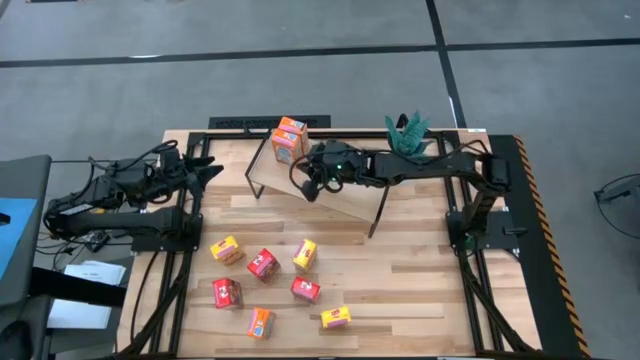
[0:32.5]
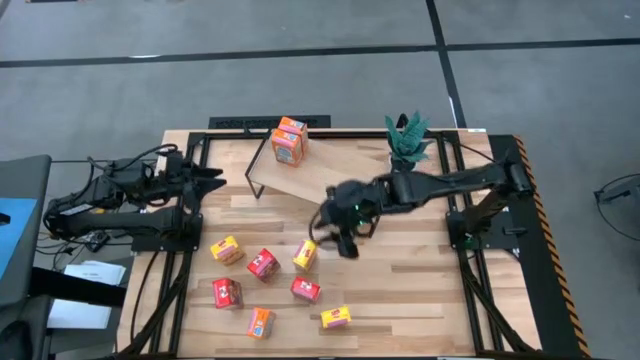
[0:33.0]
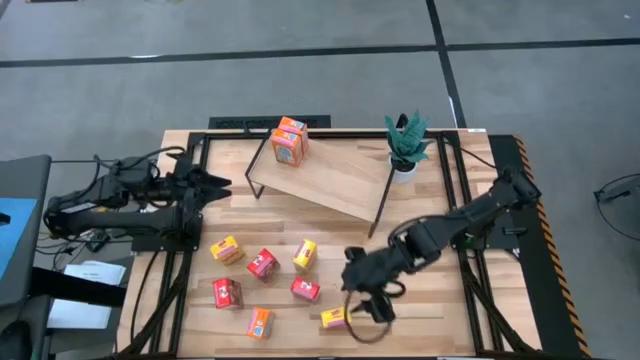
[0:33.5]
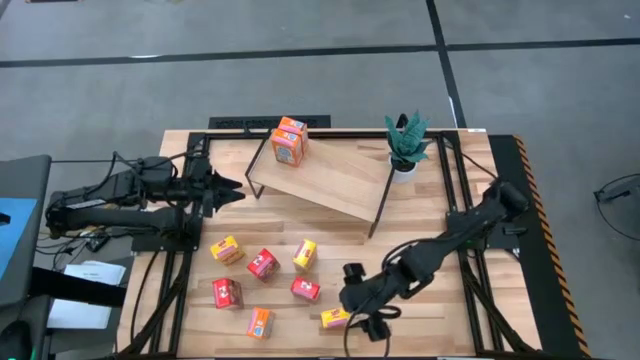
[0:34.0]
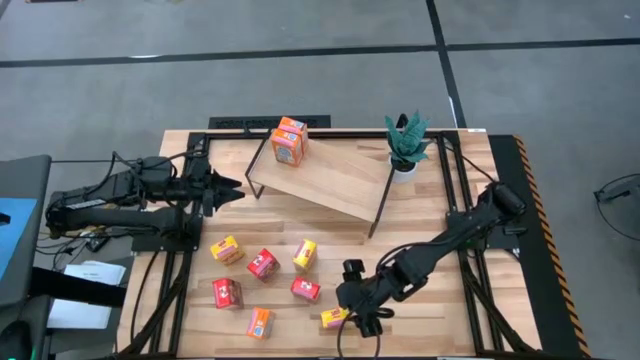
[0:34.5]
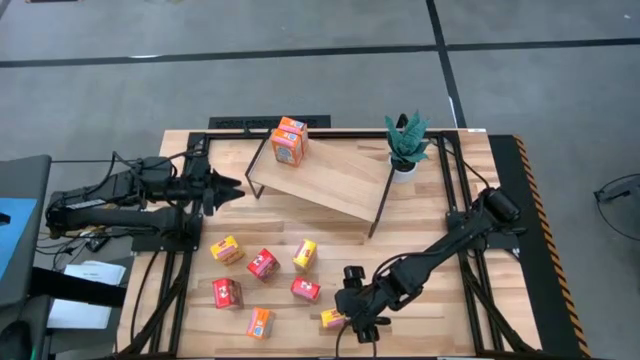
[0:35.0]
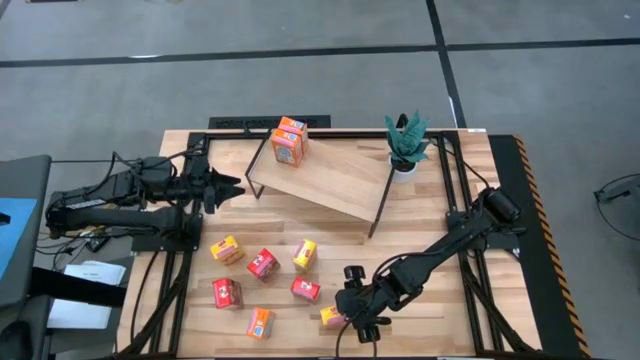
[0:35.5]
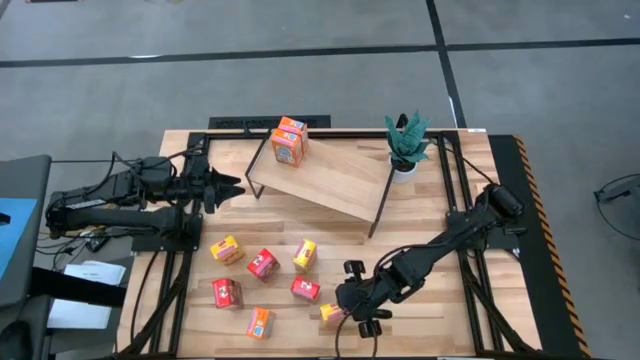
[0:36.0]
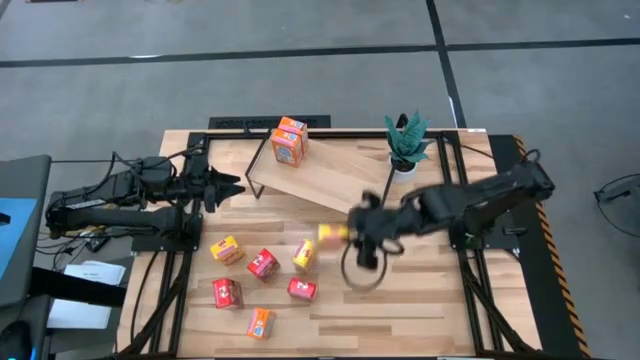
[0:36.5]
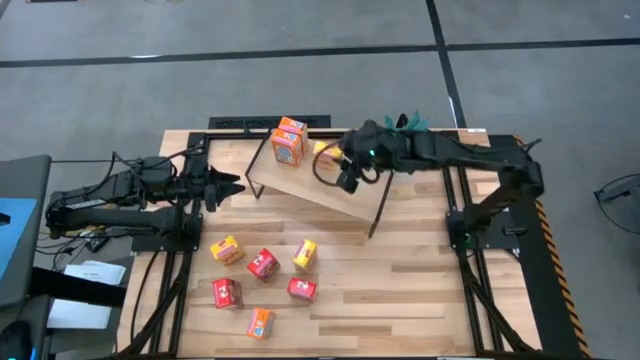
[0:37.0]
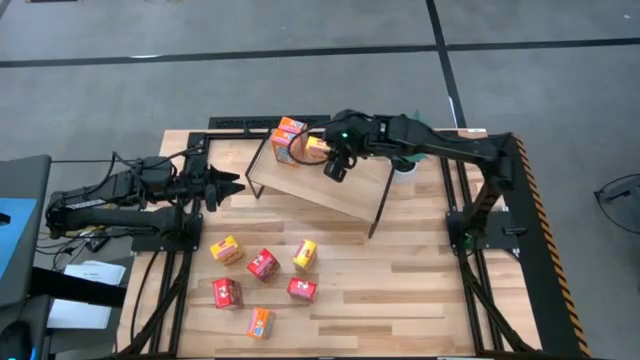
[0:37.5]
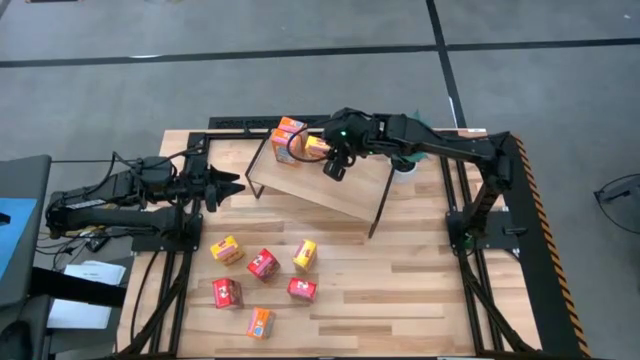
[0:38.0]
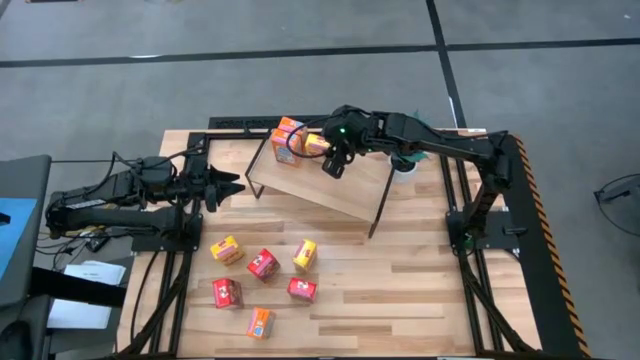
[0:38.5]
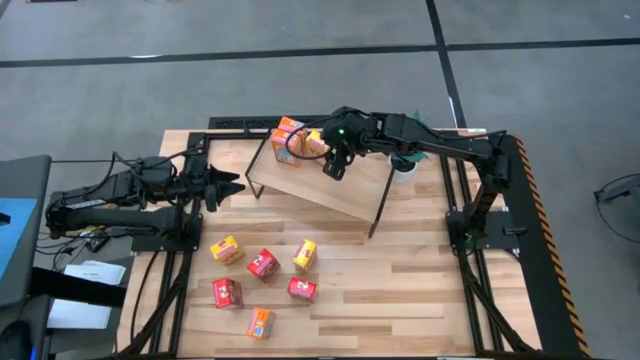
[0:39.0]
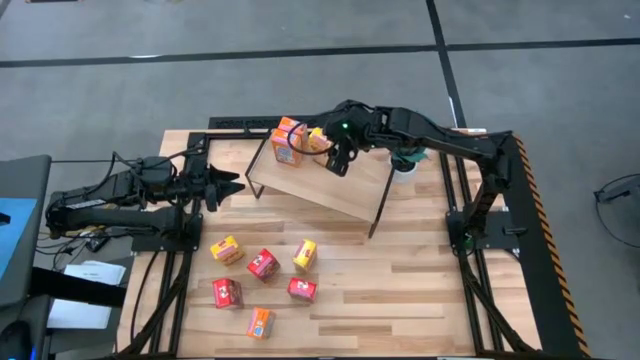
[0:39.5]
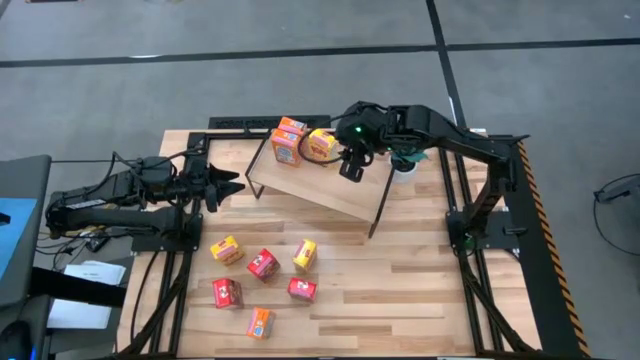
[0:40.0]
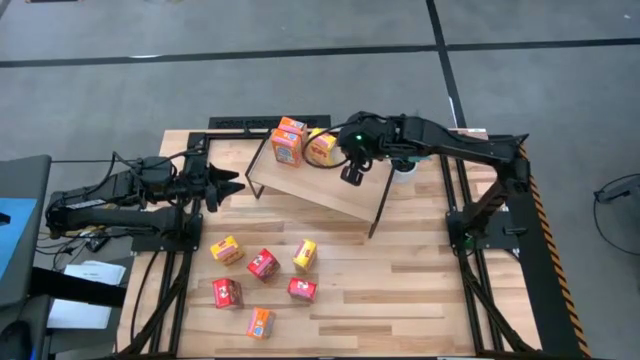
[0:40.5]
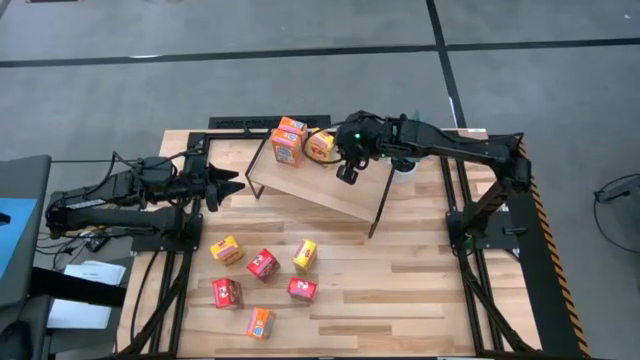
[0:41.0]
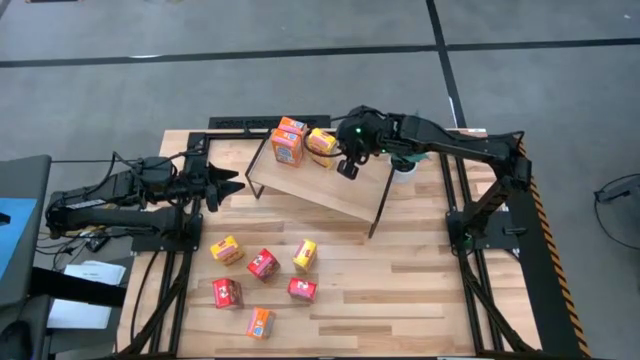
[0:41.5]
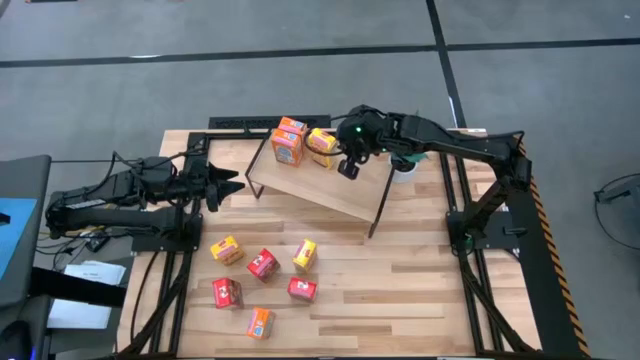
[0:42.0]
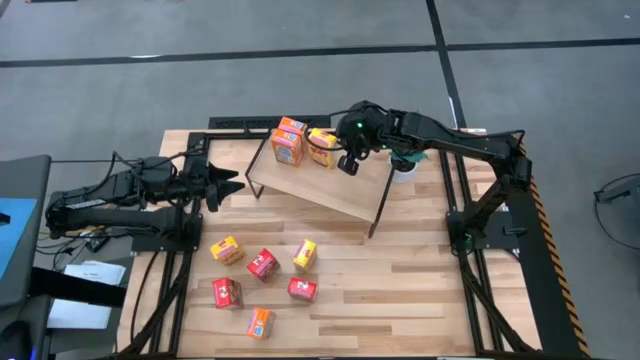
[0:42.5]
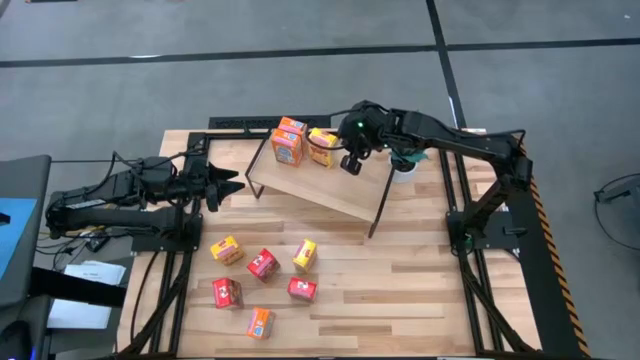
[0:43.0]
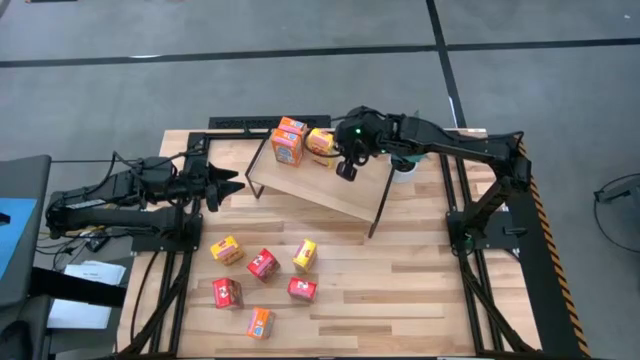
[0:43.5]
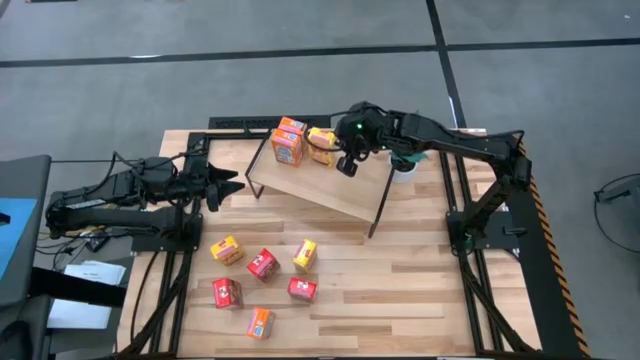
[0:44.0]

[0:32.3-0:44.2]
Task: Stack cereal on shelf
Put the bottom yellow cereal box on the shelf

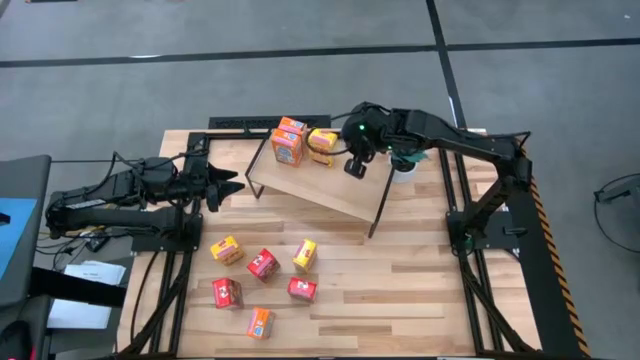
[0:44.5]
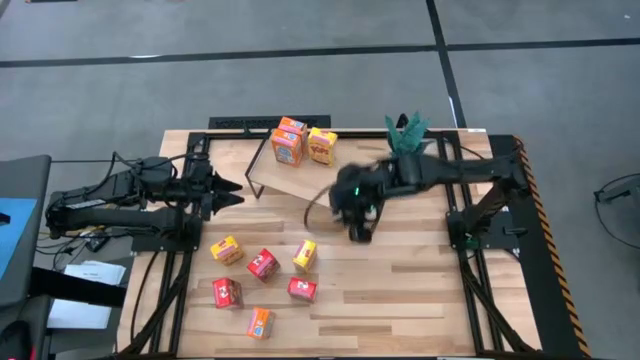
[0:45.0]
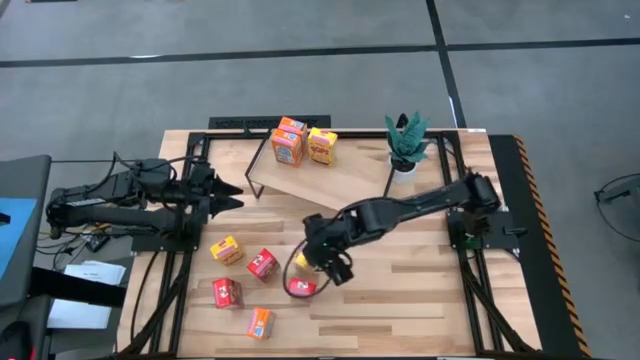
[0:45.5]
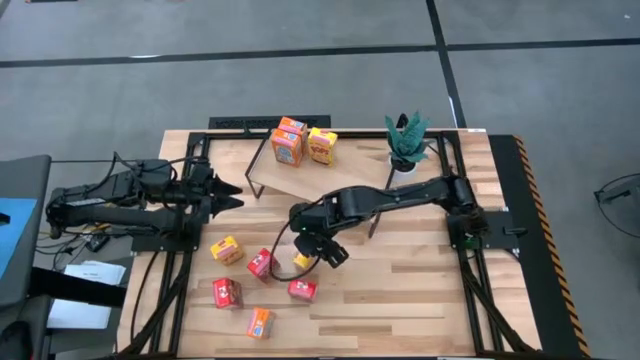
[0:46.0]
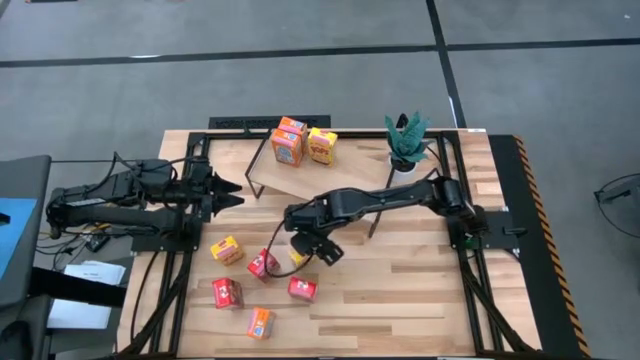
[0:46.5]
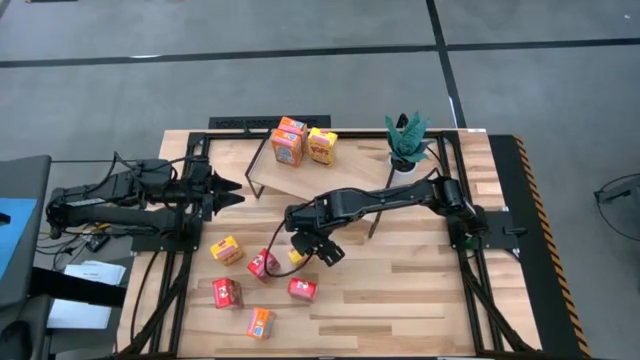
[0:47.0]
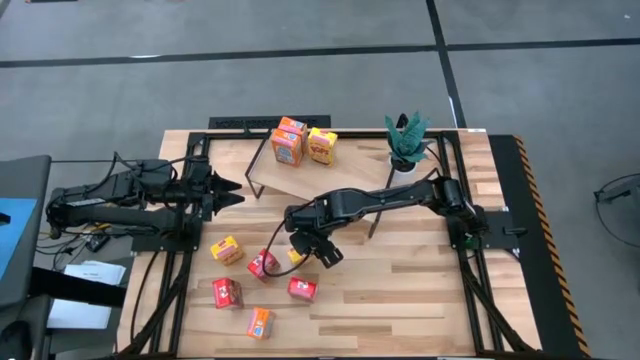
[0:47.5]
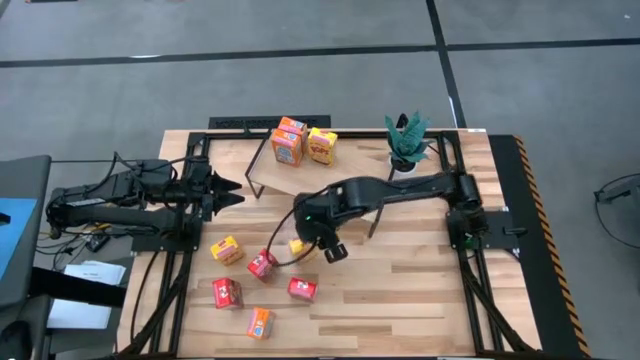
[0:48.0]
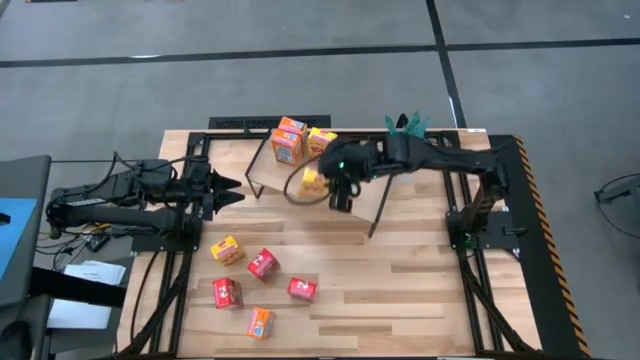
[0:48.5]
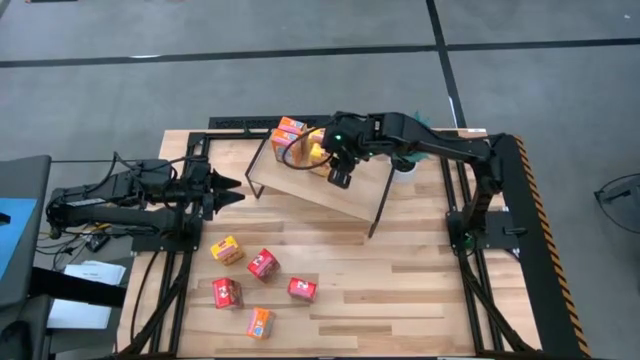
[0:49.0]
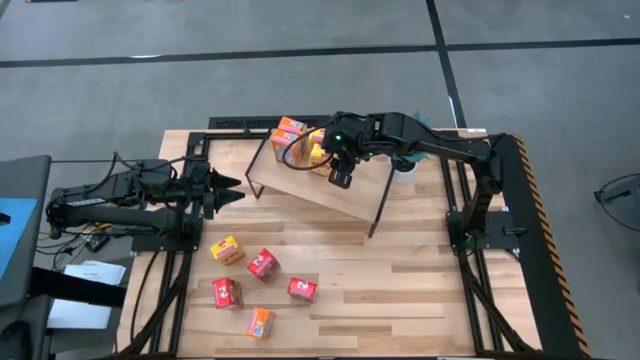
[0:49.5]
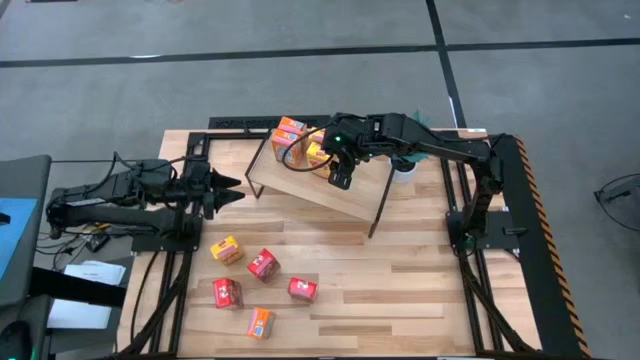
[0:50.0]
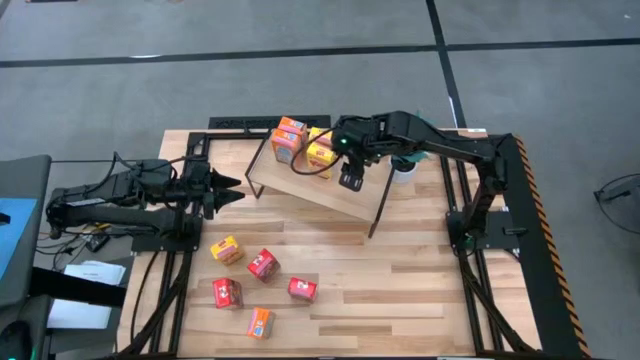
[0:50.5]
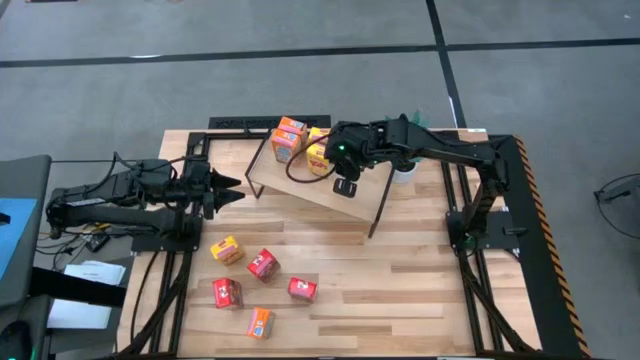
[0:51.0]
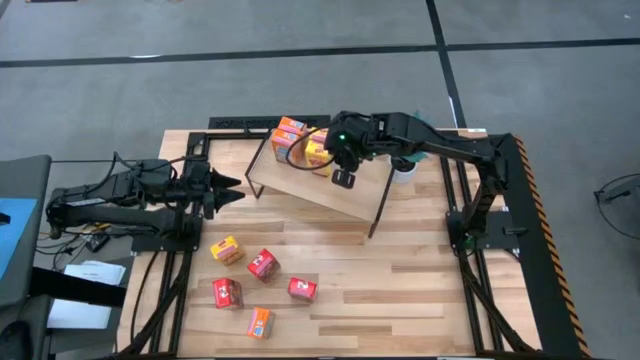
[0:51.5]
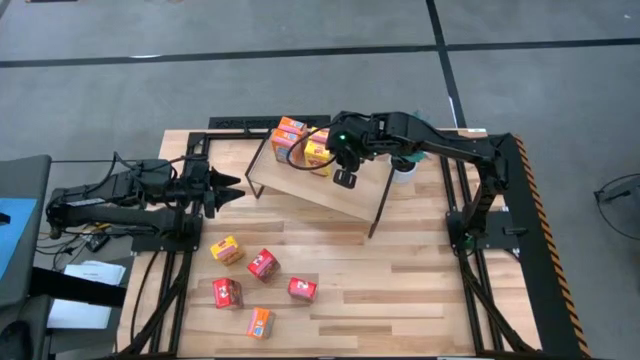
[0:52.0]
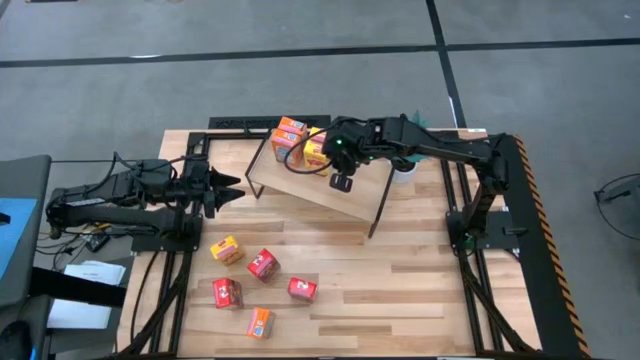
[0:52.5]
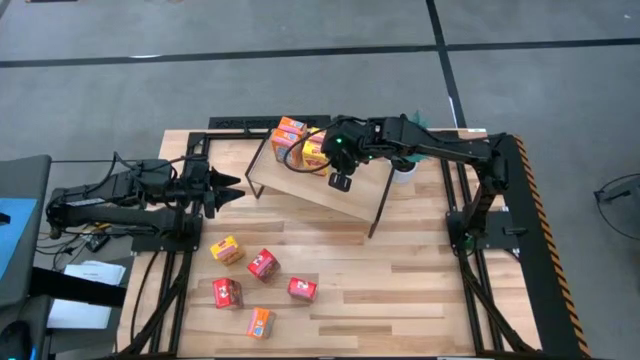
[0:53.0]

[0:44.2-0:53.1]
Put the right yellow cereal box aligned with the other yellow cereal box on the shelf

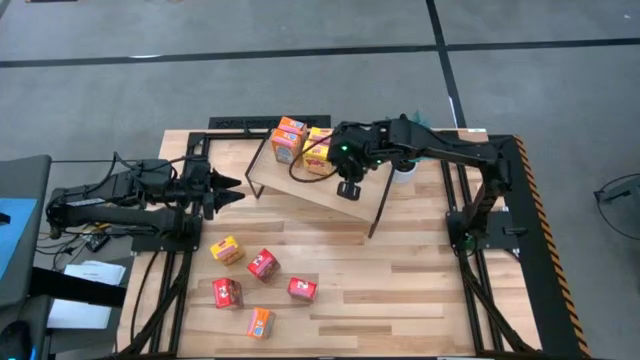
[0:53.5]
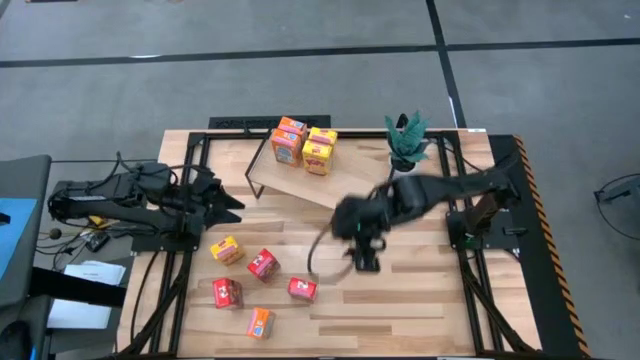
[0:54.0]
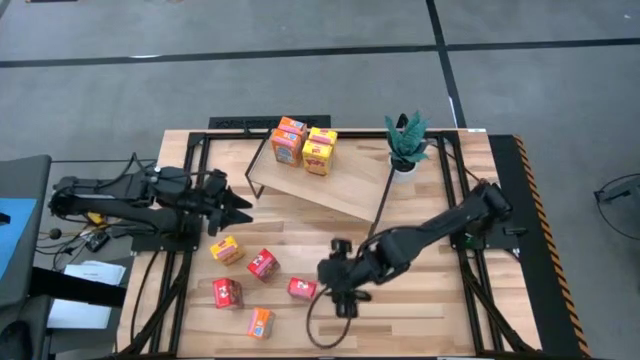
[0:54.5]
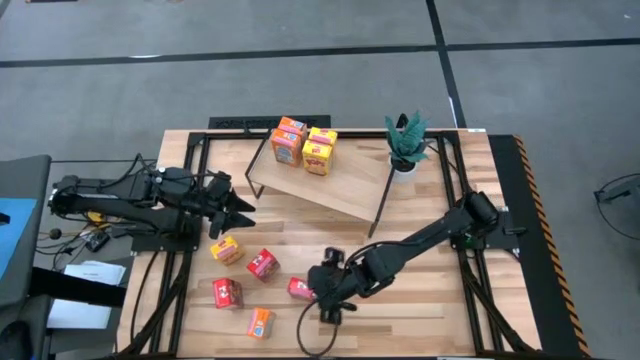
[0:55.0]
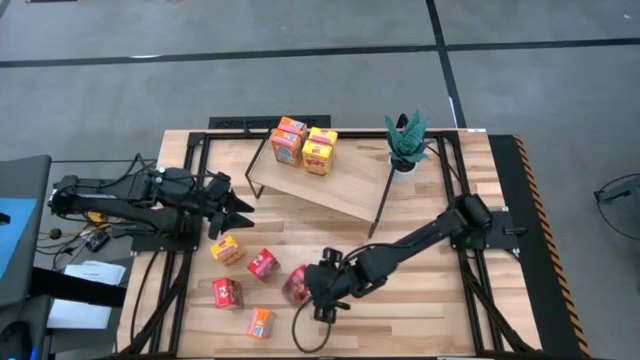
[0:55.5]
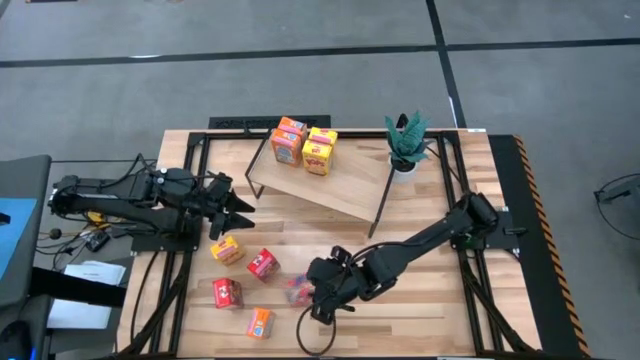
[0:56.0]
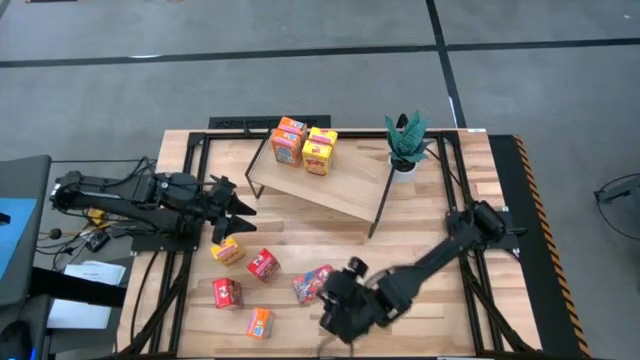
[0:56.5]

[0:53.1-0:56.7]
Put the right red cereal box on the shelf
